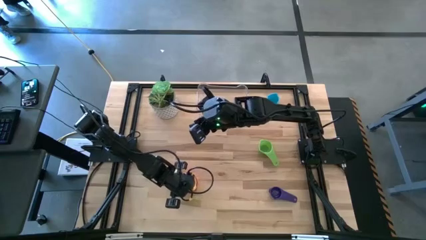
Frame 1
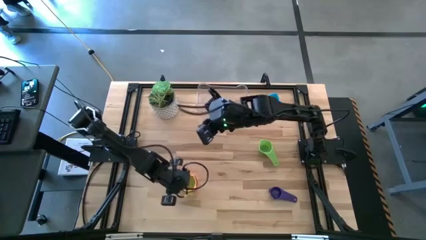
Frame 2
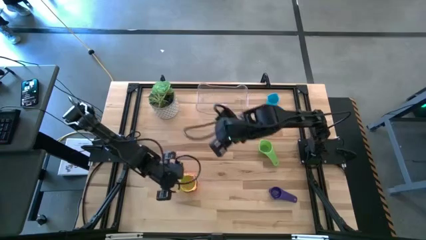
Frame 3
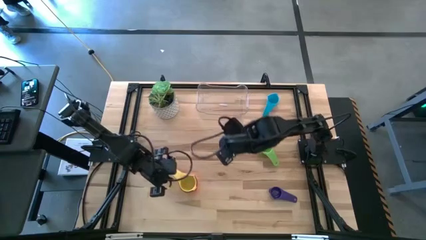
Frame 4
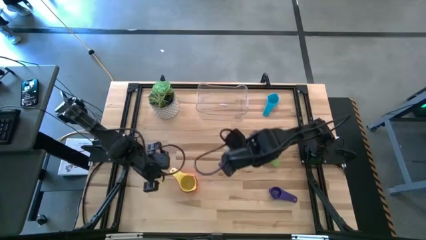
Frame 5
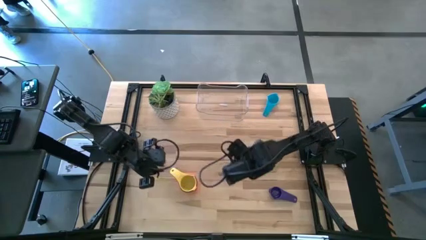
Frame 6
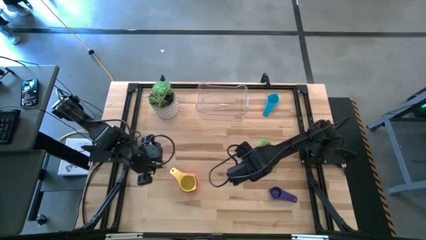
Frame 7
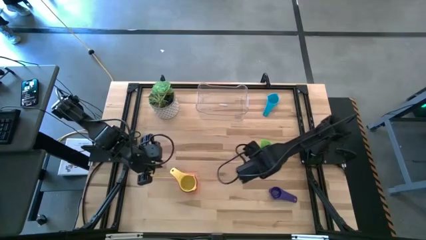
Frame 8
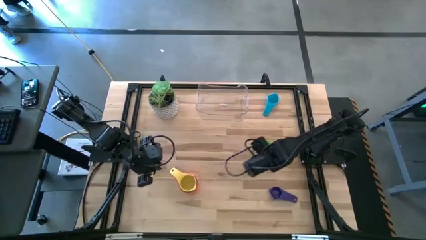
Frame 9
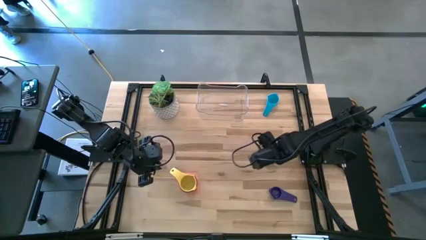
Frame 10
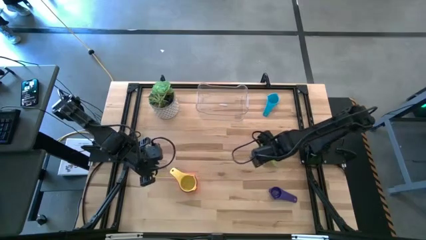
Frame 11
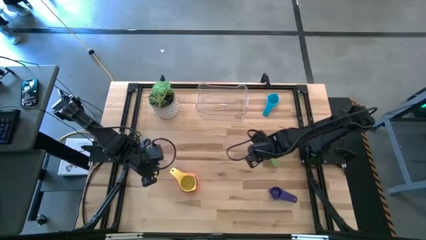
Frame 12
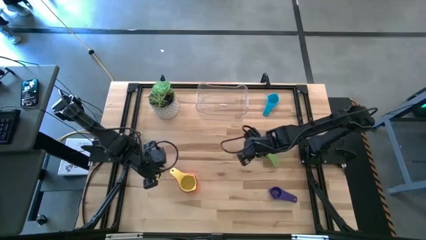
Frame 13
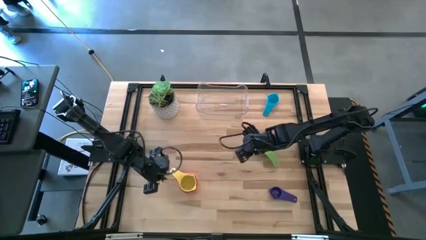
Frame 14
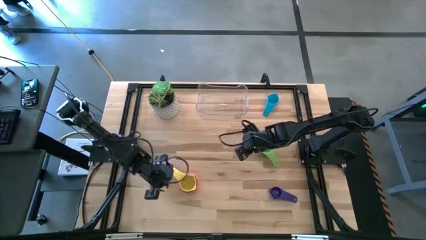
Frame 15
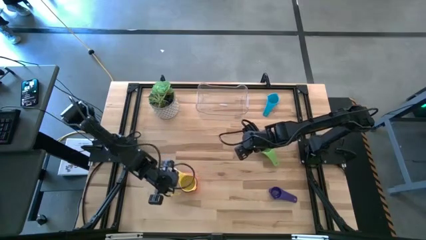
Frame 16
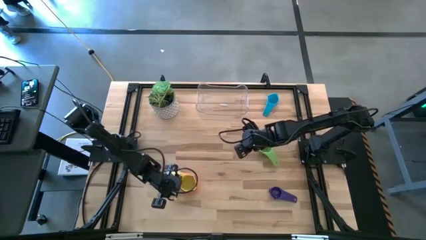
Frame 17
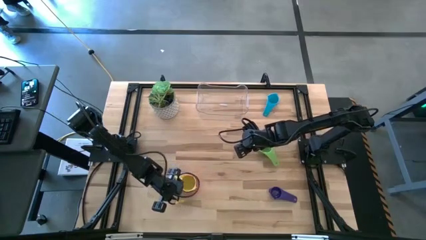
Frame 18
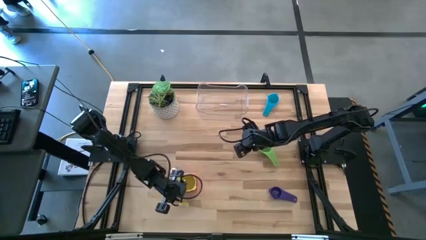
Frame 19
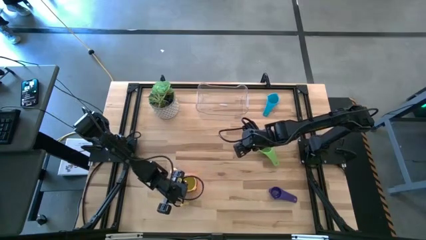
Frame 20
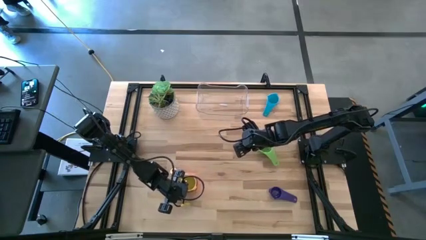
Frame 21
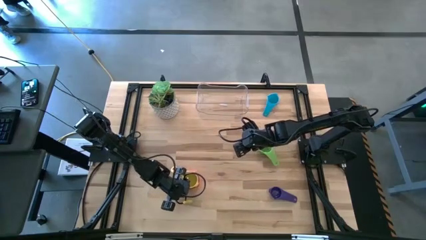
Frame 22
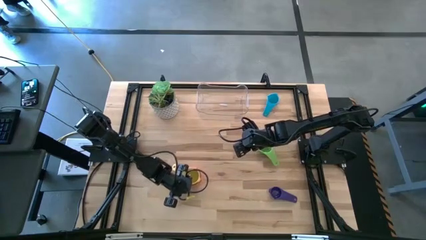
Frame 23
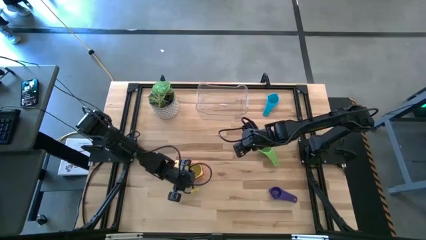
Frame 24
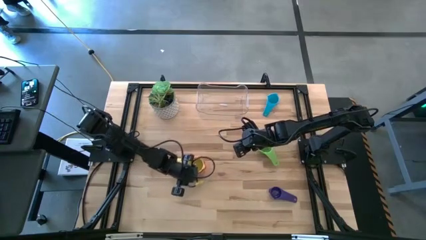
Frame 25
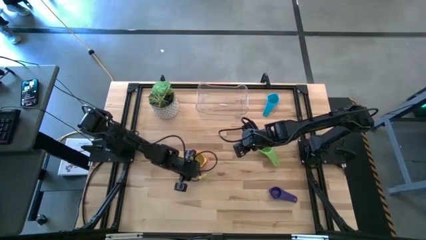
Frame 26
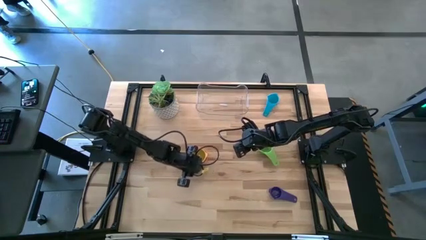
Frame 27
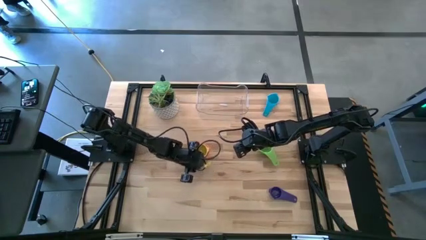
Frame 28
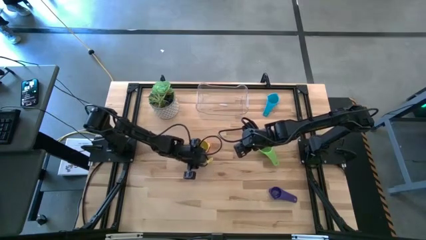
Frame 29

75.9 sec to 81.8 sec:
Task: Nest measuring cups in basket
Move the nested measuring cups to the middle of the table

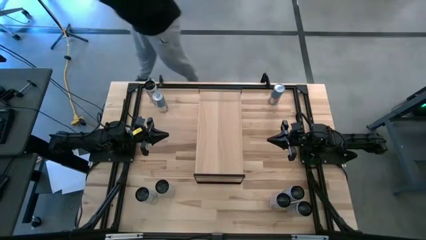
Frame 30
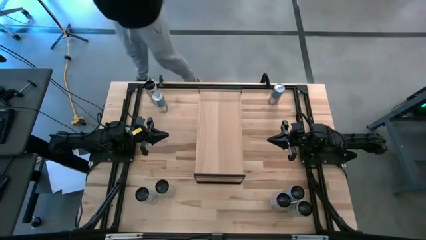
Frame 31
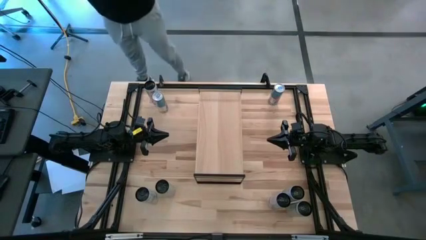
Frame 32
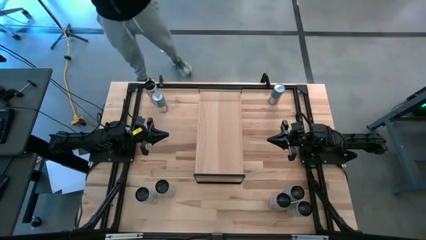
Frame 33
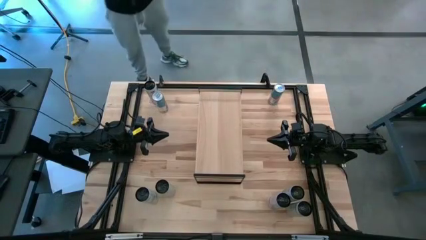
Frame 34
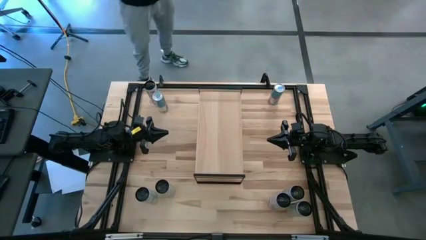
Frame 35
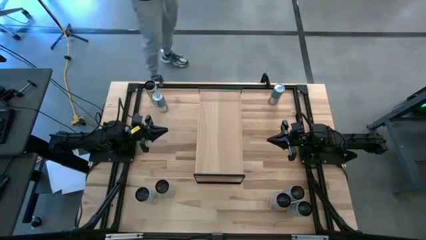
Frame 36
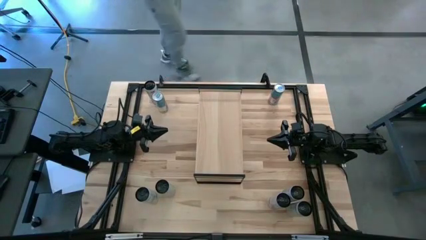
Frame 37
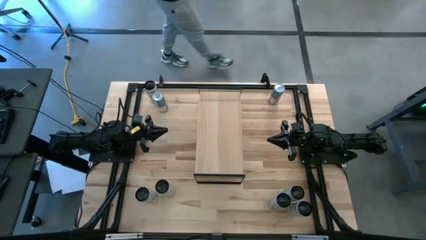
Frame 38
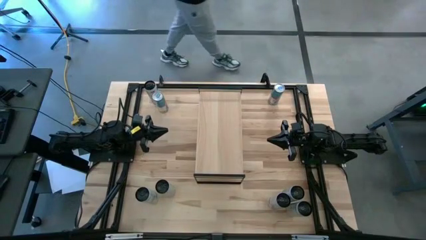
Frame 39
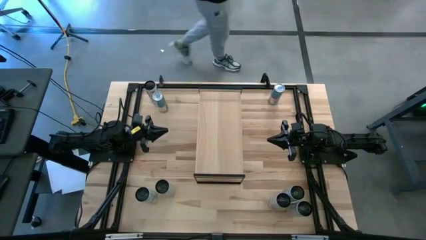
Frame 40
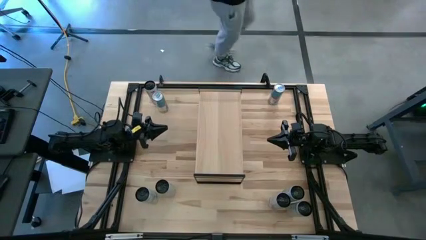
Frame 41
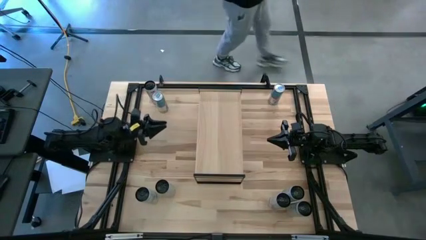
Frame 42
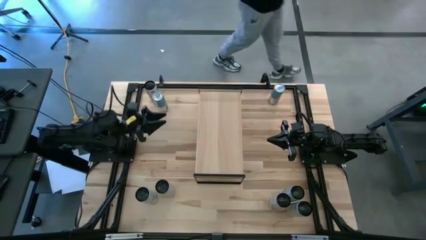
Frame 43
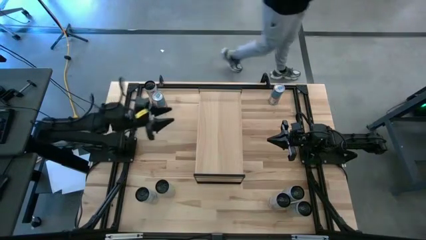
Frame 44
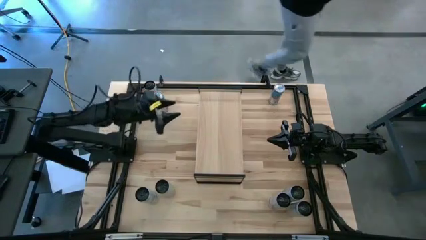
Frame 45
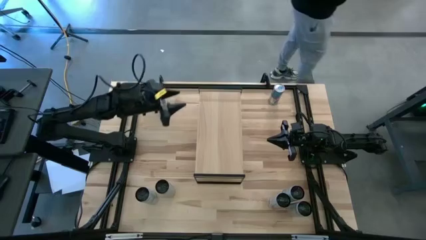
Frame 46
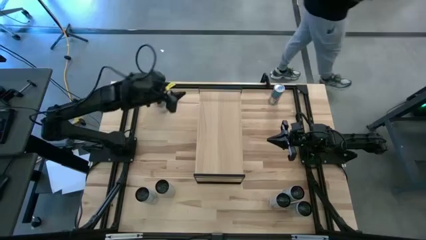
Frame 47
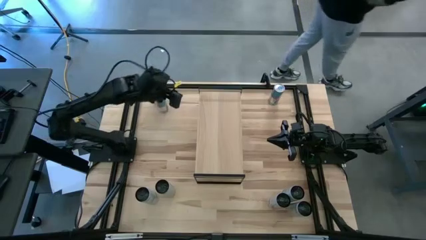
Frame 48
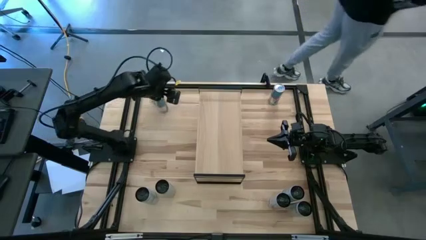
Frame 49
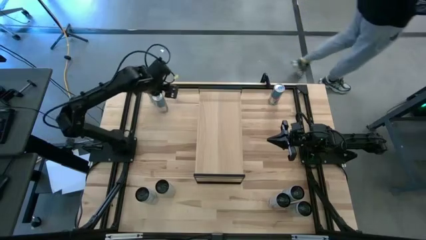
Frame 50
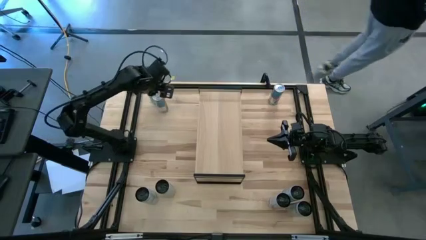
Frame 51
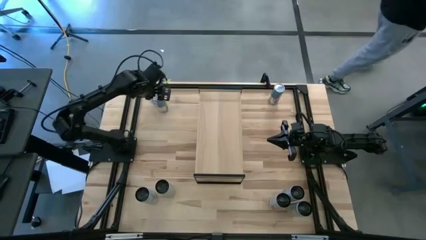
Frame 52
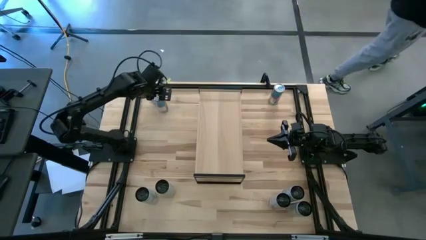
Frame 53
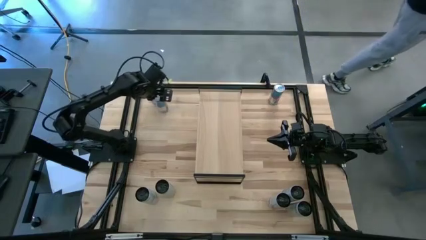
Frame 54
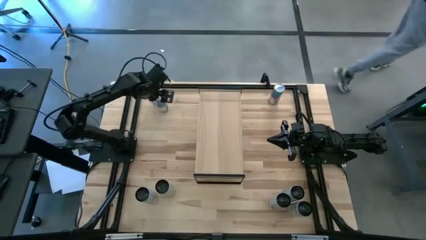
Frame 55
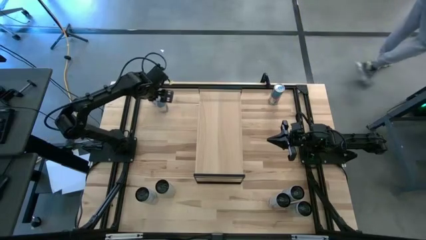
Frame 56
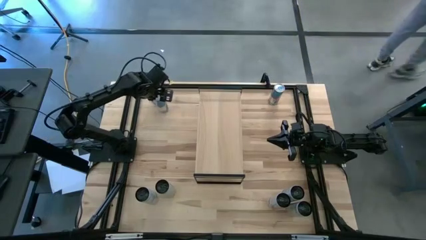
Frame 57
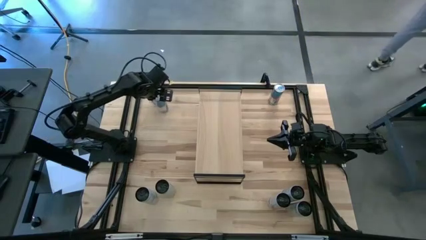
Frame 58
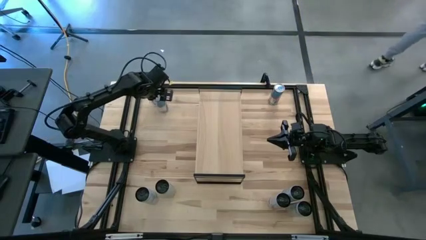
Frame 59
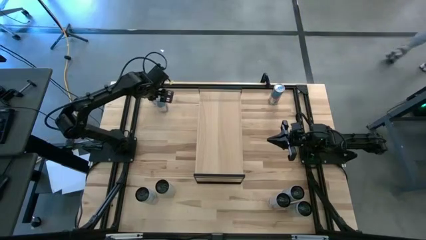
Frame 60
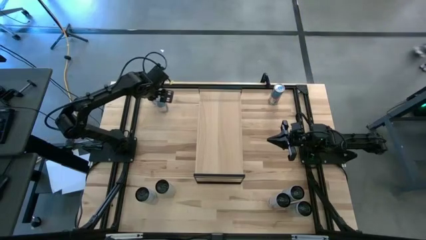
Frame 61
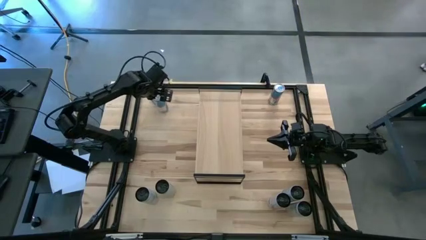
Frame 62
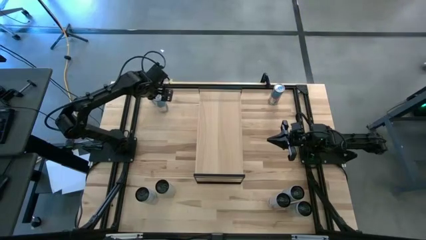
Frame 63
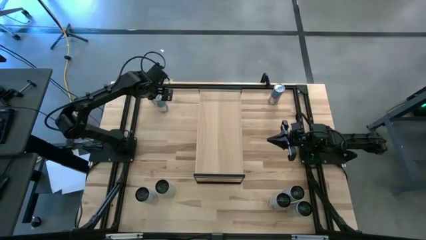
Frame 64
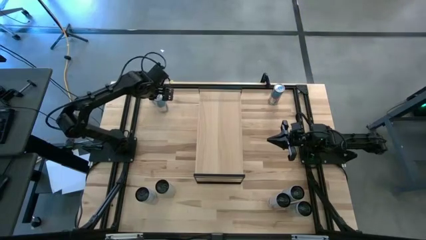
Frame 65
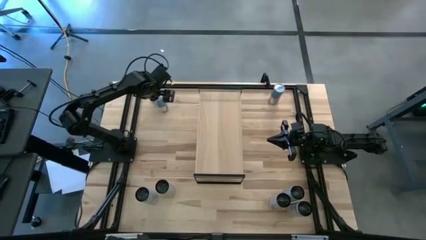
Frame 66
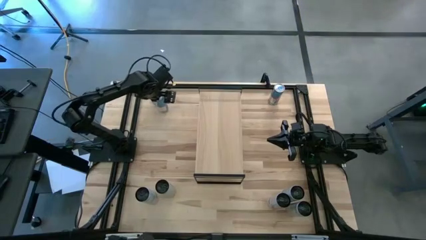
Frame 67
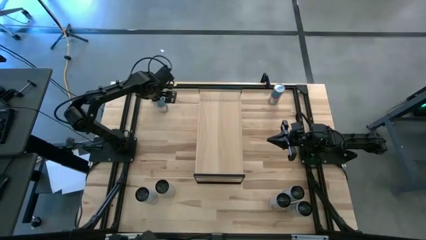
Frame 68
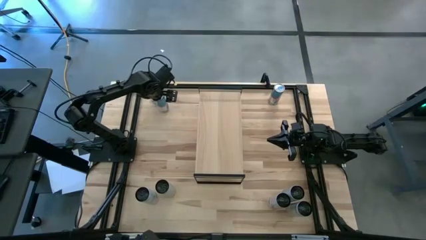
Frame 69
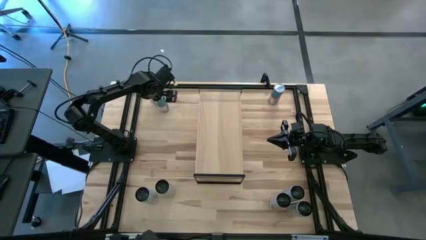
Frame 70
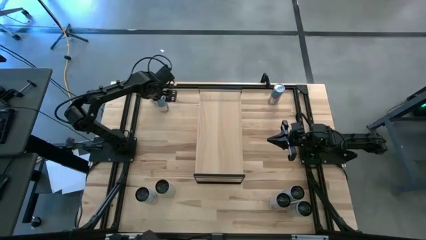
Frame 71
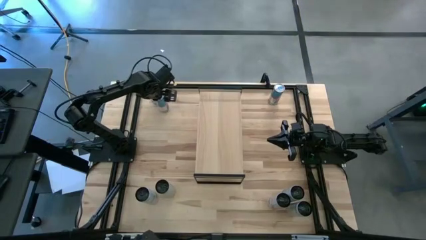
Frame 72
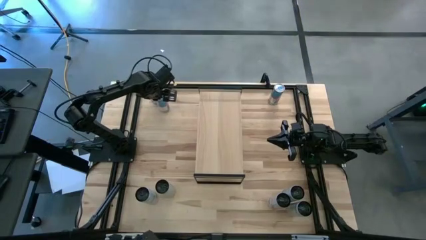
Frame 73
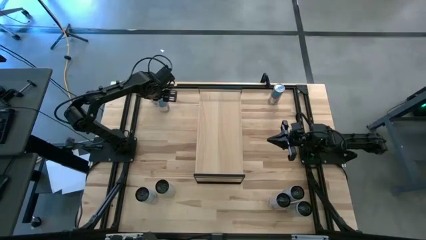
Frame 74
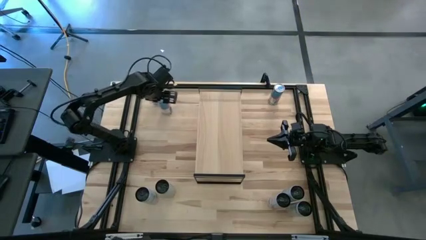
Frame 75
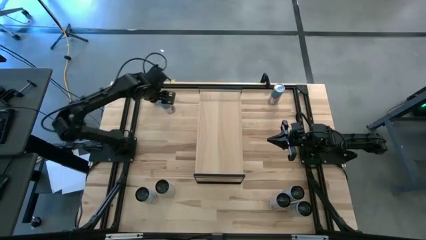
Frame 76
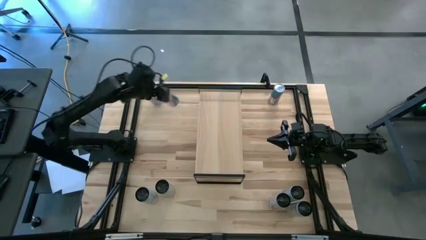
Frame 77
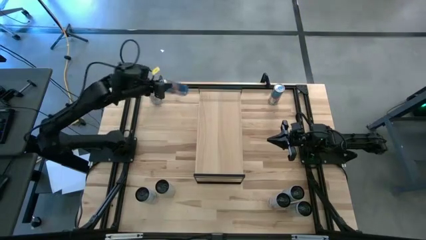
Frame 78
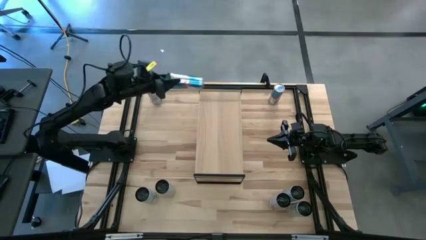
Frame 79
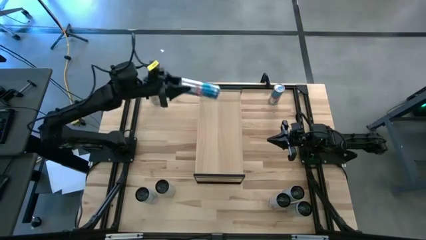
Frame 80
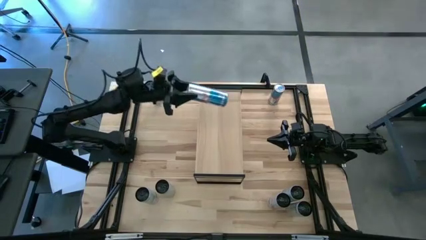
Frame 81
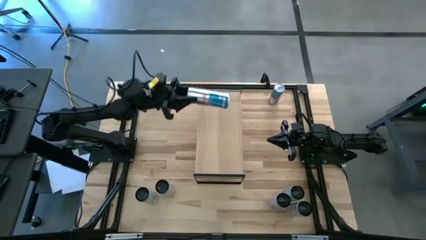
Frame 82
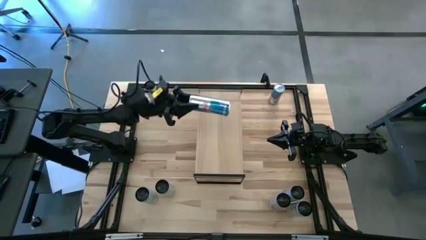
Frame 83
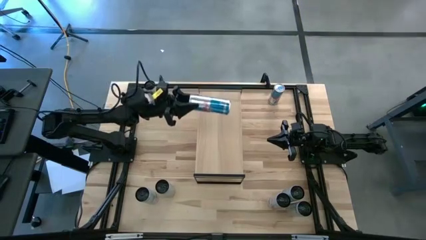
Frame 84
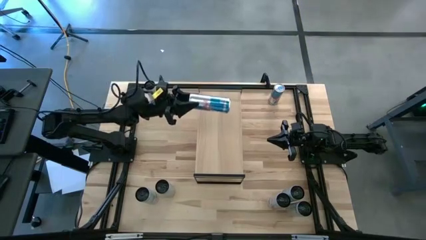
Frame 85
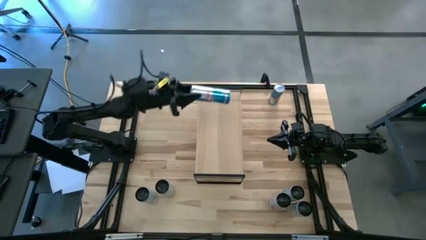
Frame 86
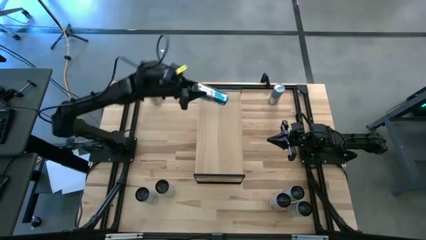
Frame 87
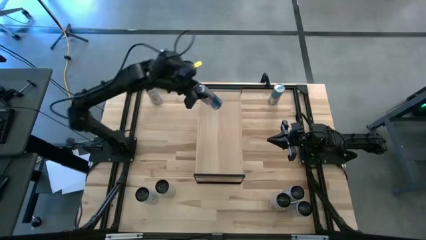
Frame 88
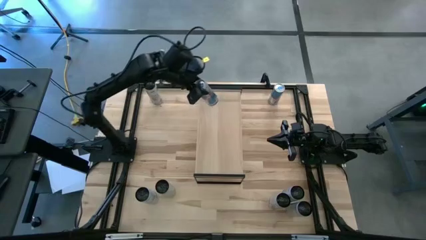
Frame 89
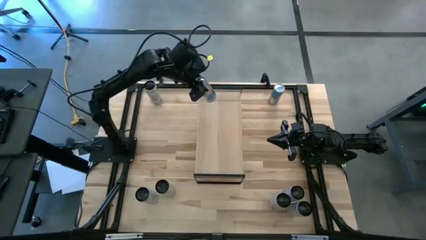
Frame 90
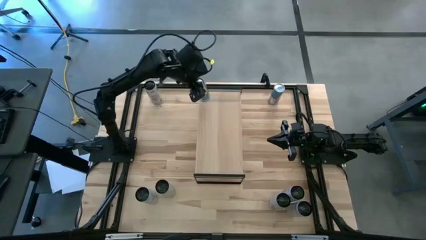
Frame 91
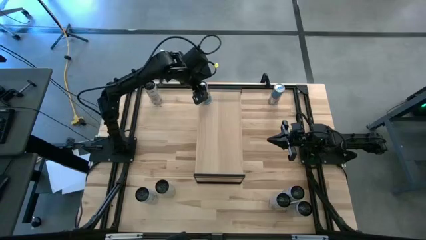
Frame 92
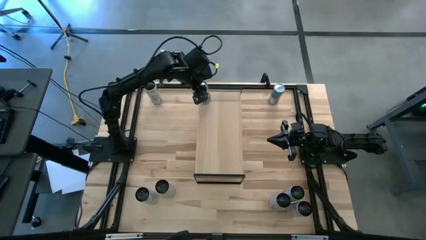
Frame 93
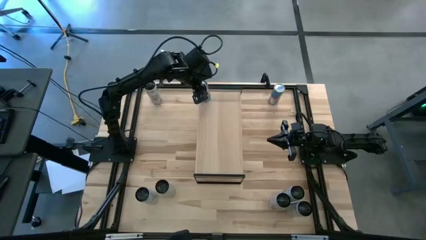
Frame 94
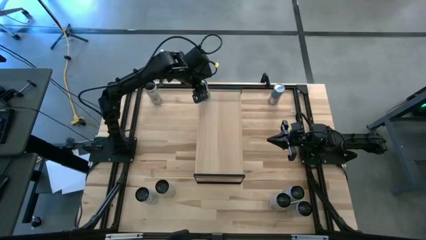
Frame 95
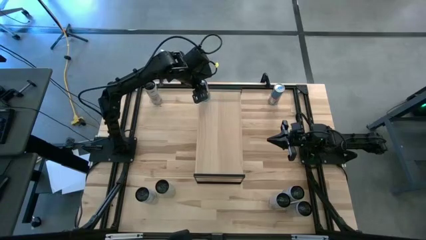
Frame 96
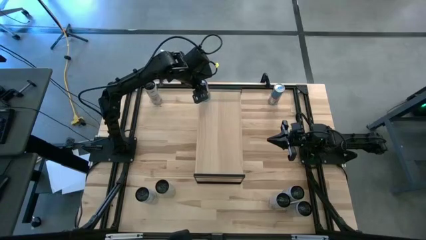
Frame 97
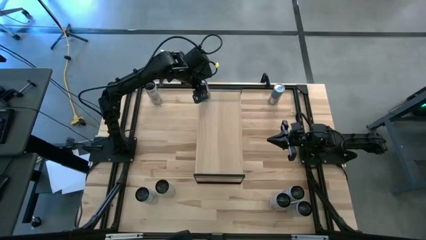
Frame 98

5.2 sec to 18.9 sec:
Task: Place canned beverage on shelf
Put the top left blue soda can on the shelf
